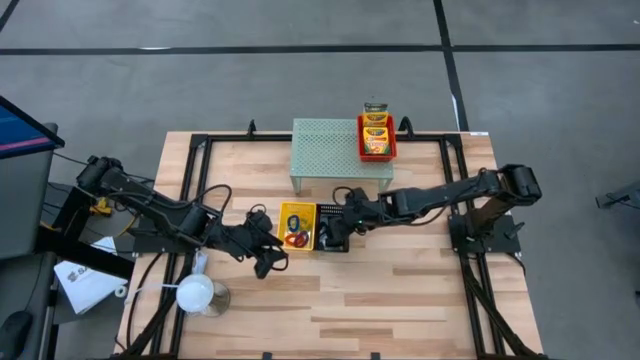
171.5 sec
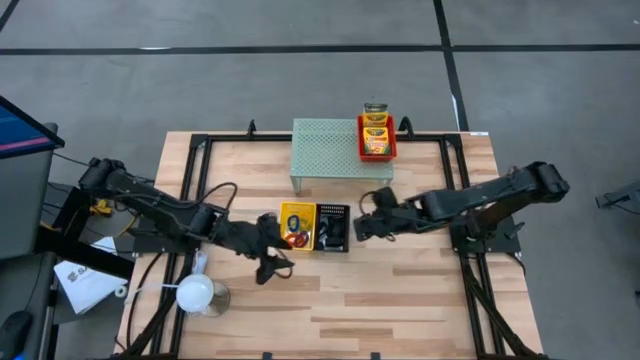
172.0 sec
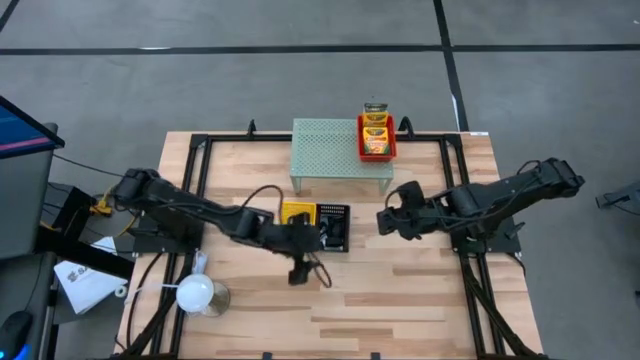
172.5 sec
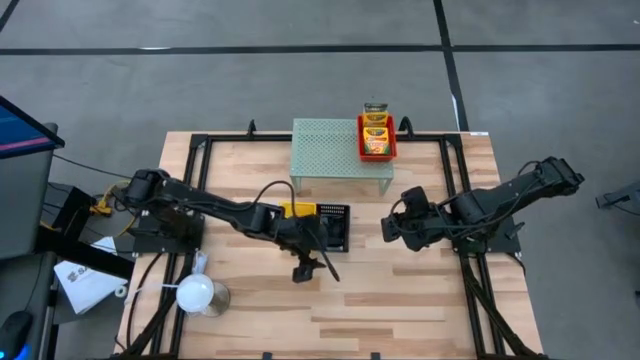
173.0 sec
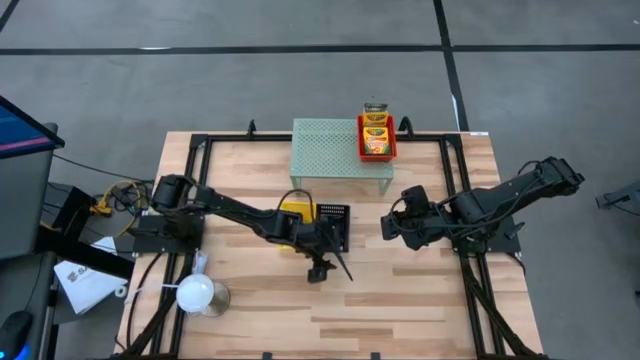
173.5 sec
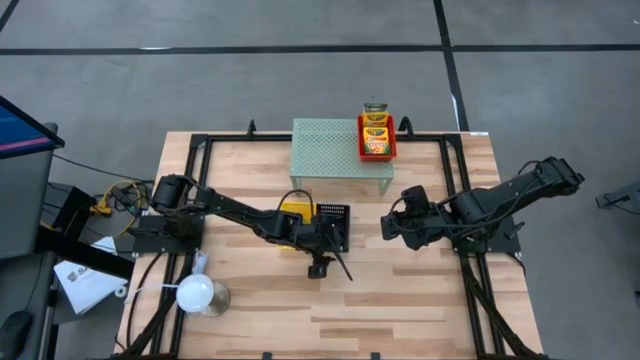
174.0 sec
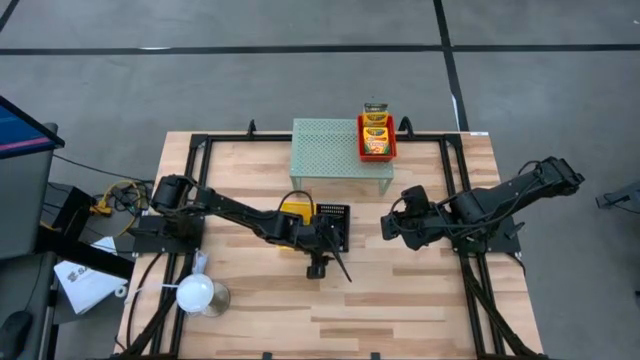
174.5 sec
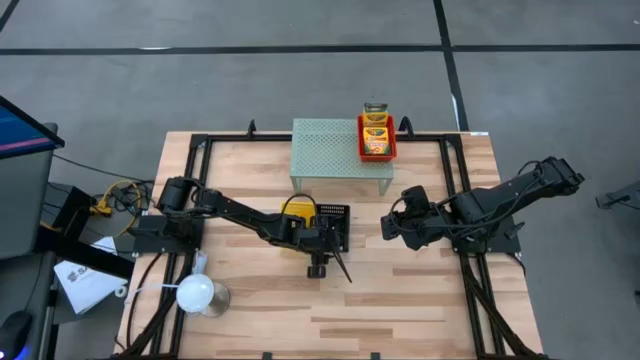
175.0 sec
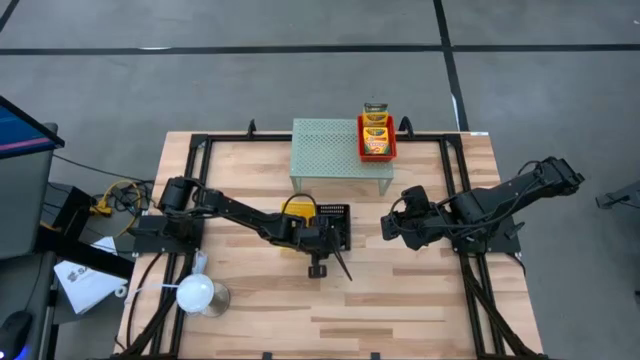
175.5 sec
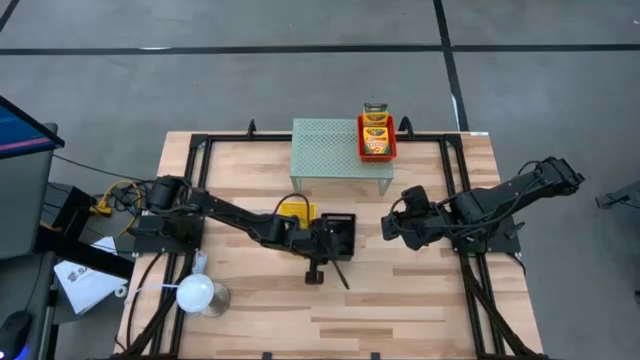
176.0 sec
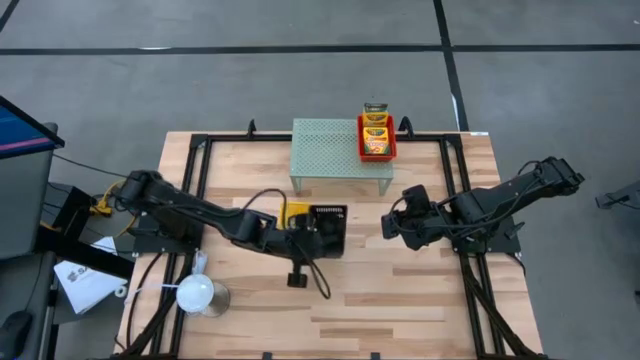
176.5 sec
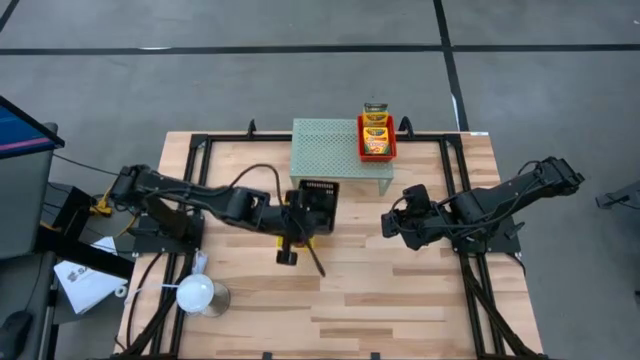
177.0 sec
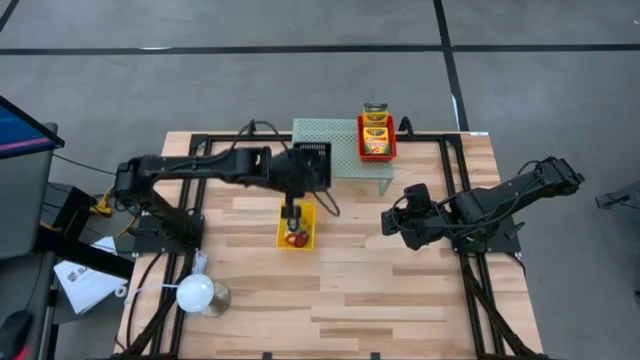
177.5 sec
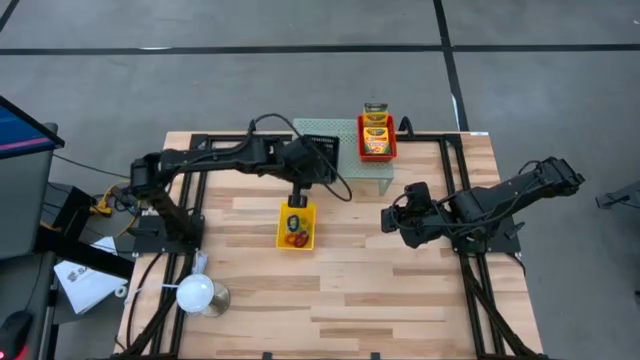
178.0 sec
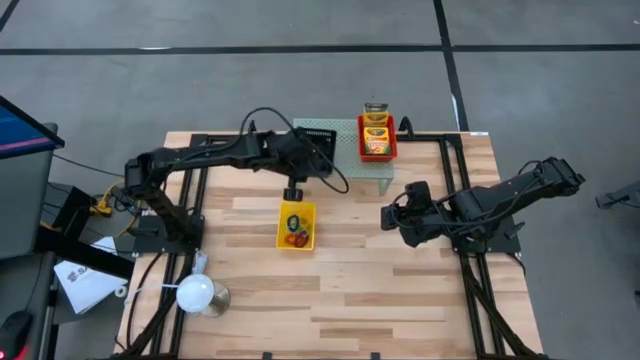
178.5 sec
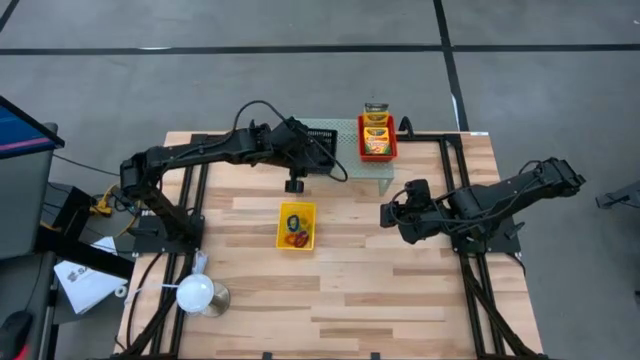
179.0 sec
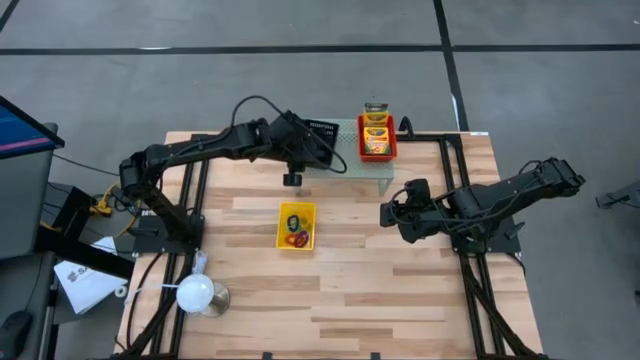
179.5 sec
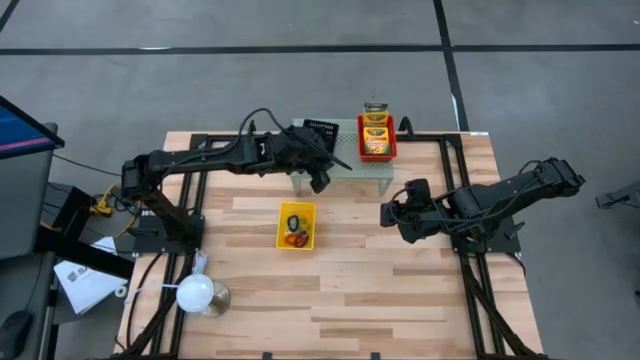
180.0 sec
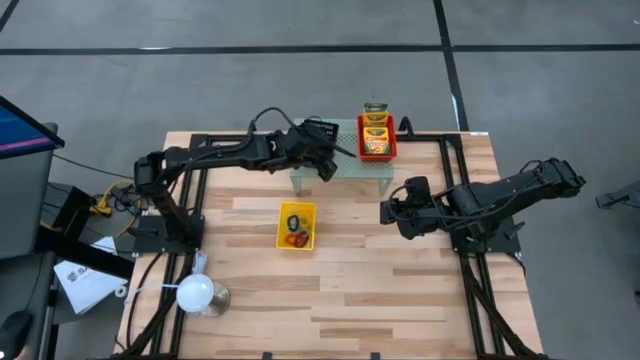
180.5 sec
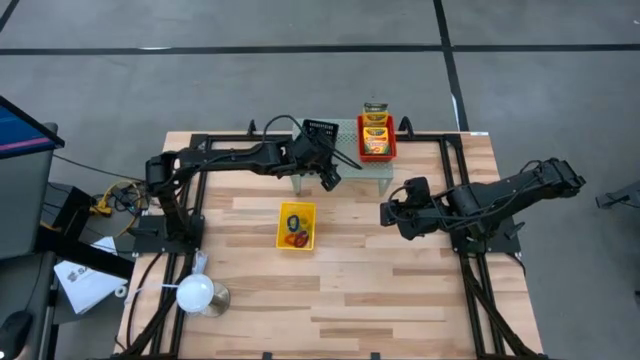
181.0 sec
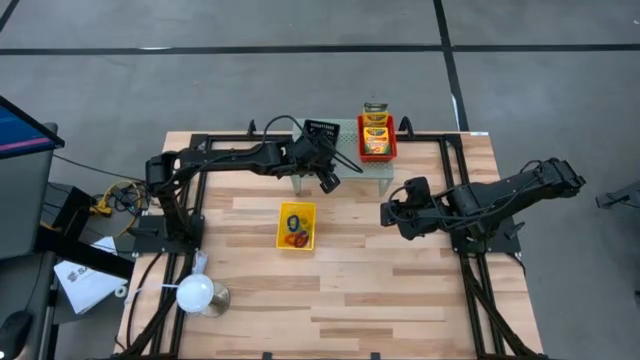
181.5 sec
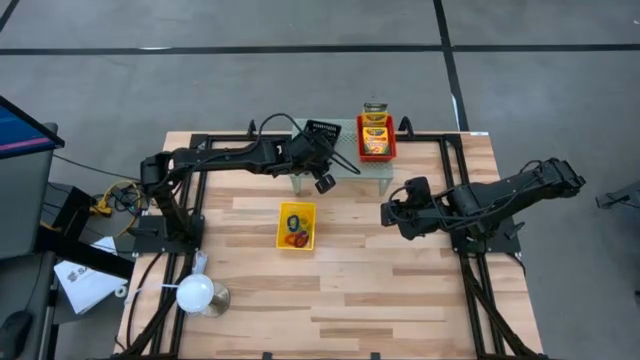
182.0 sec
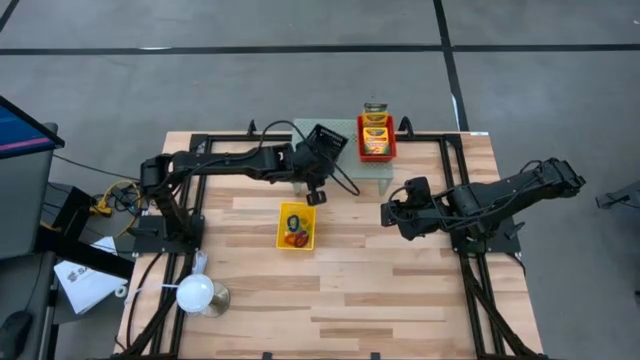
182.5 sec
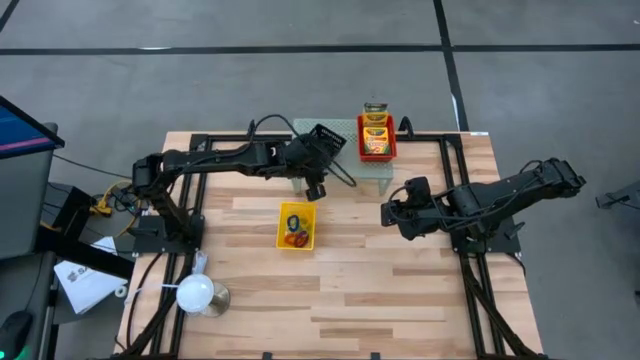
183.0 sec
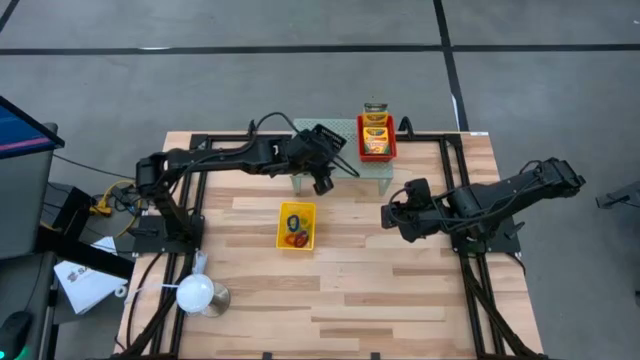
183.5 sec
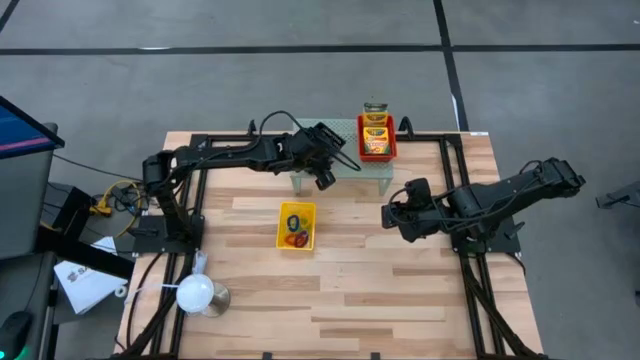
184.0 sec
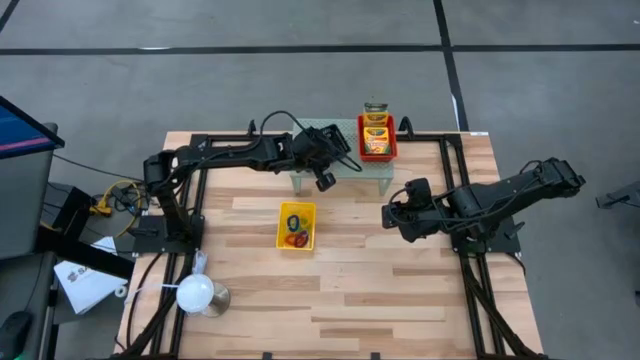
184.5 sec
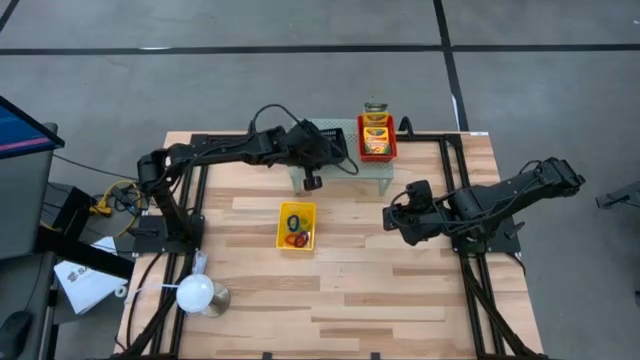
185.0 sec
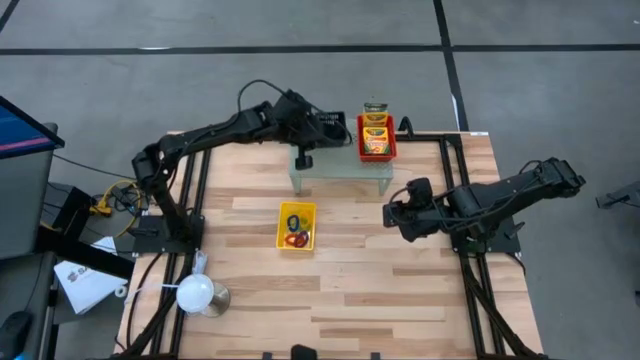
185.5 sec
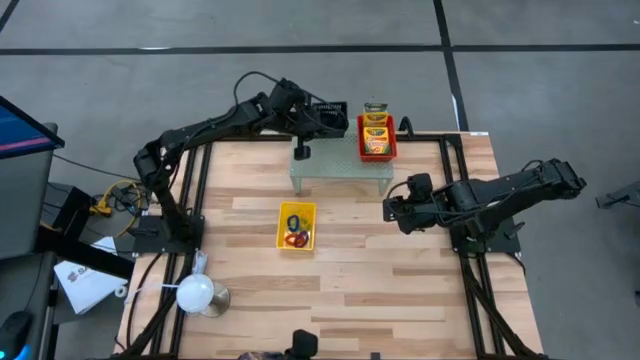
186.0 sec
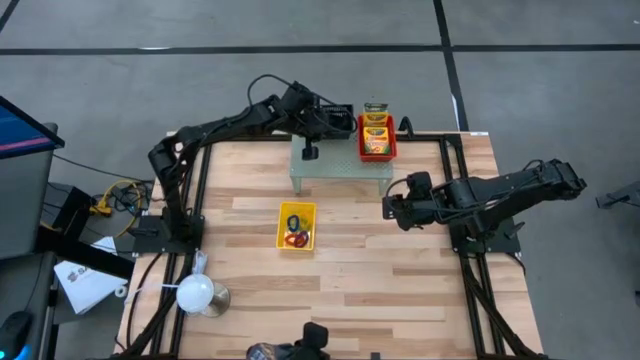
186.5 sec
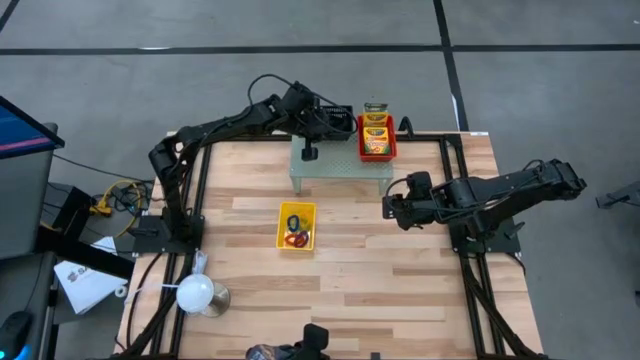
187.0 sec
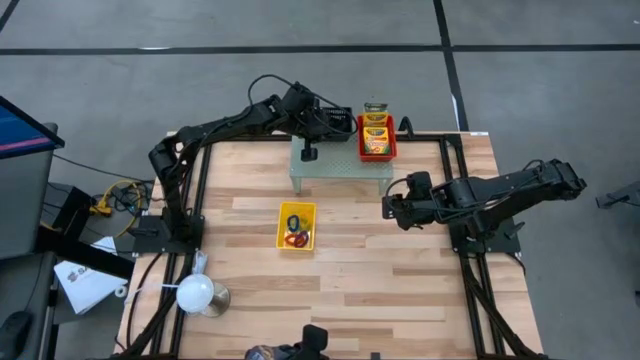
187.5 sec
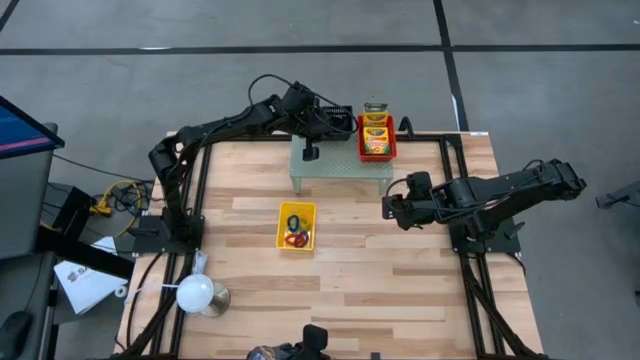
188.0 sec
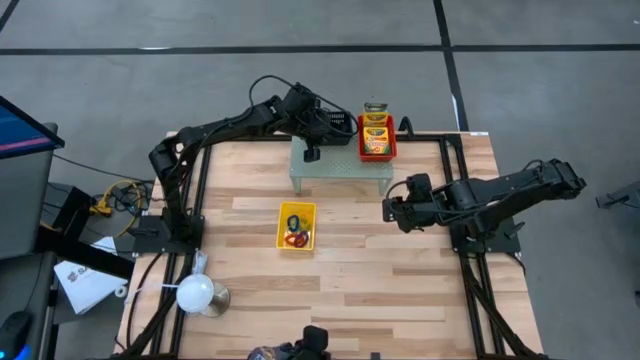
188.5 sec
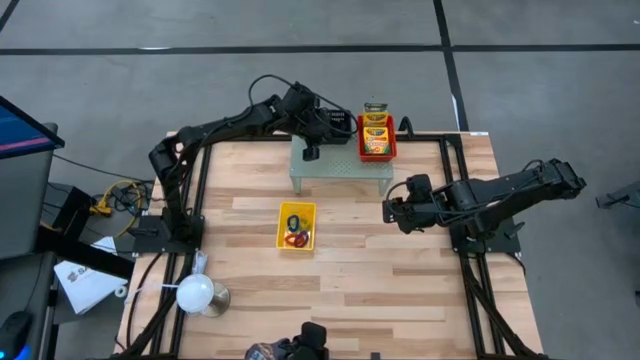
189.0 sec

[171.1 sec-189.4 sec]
Task: Pick & Place Office Desk Supplies
Put the black bin on the shelf

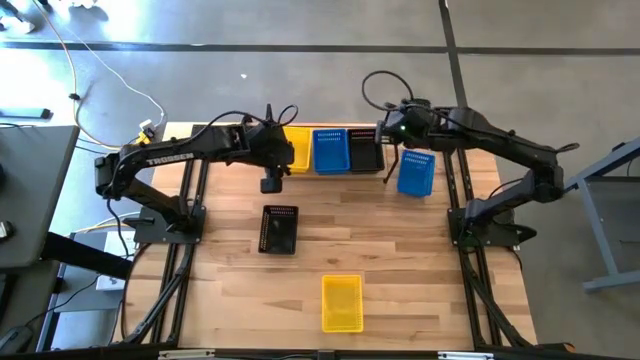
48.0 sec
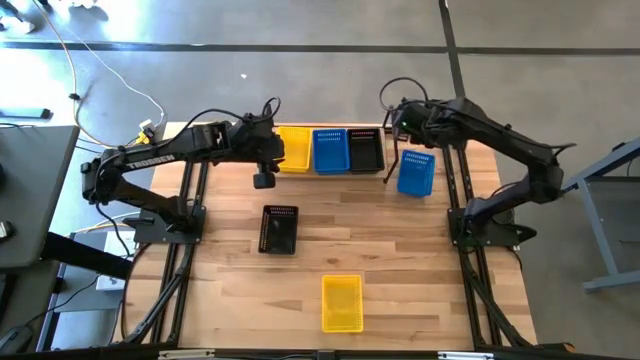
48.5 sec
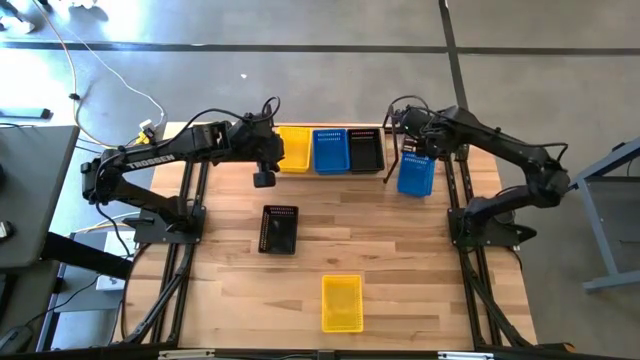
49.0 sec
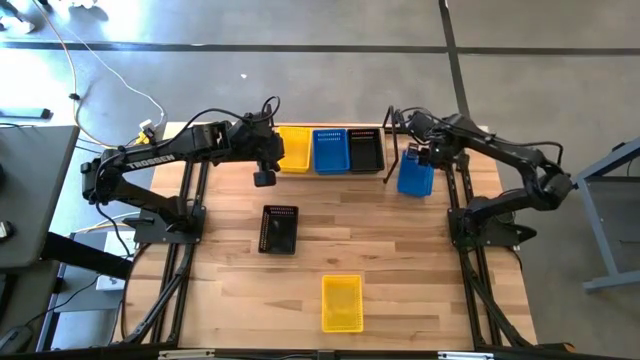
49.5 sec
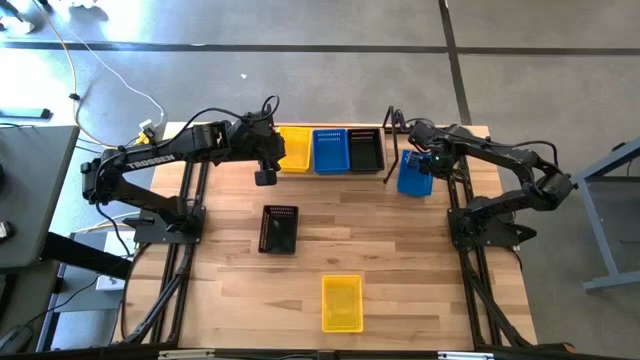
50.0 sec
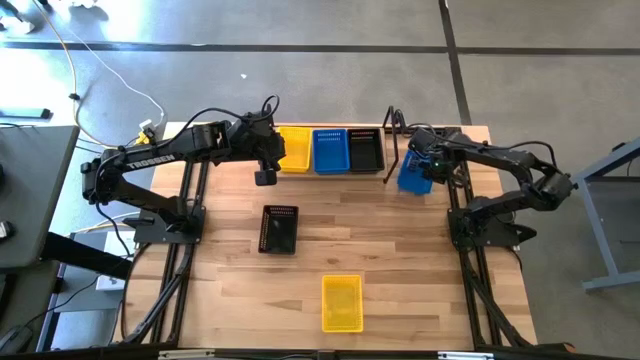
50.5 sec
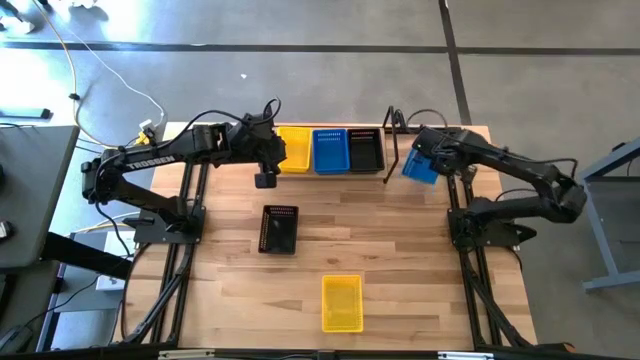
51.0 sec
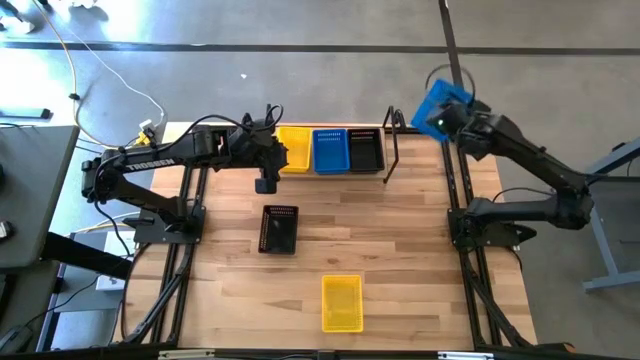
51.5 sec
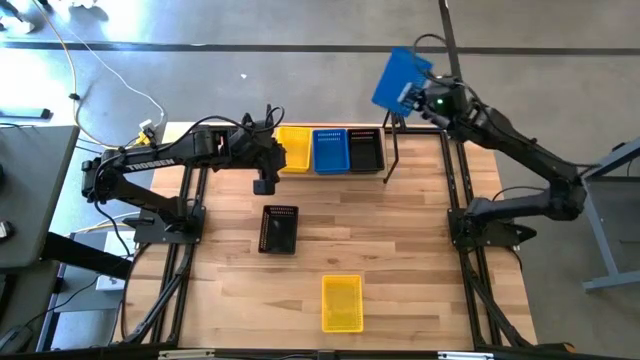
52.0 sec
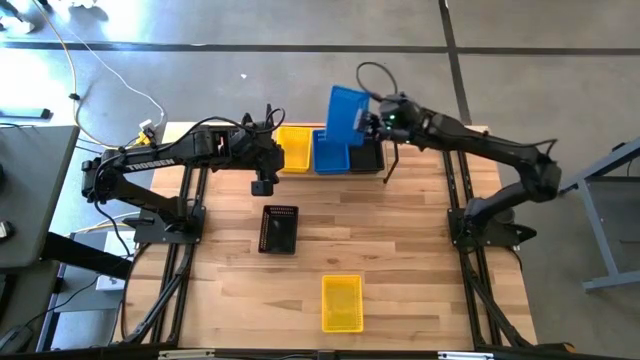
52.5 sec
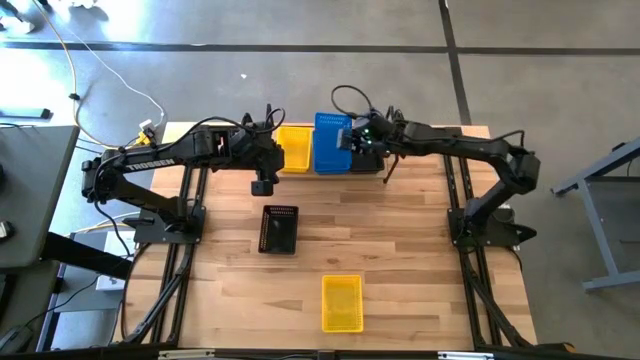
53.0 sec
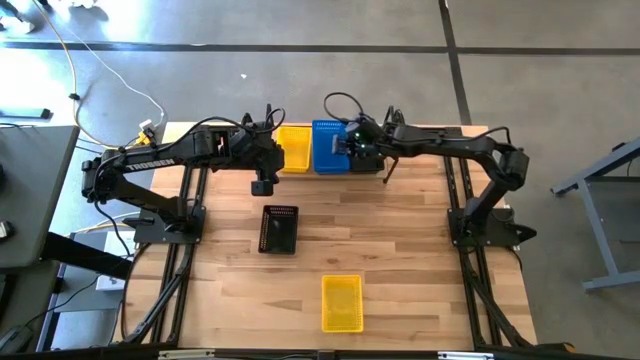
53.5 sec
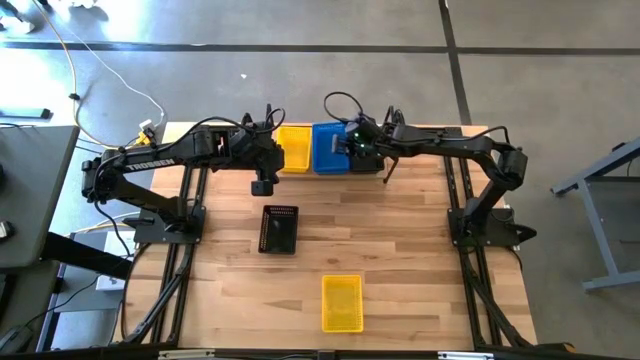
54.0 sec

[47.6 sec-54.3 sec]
Task: Stack baskets on shelf by color
Stack the blue basket on the blue baskets on the shelf
